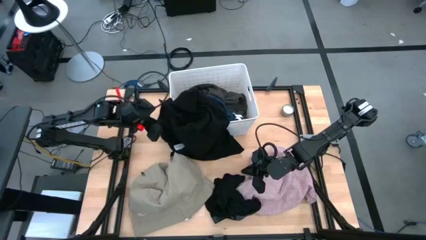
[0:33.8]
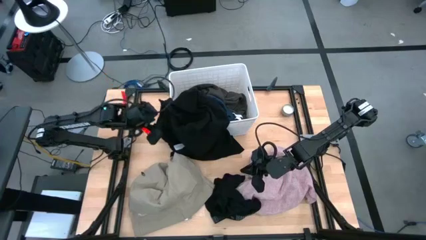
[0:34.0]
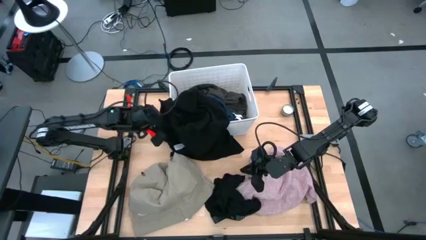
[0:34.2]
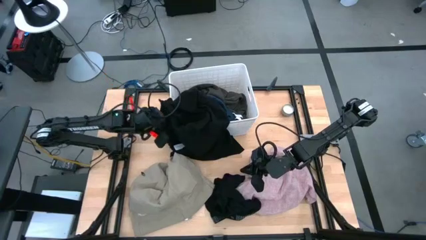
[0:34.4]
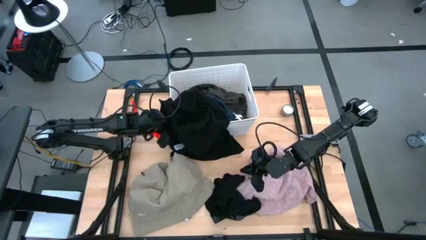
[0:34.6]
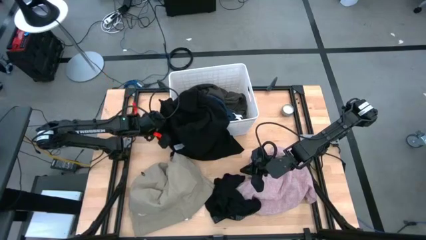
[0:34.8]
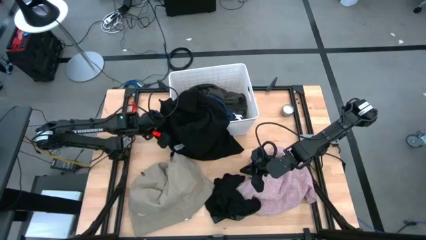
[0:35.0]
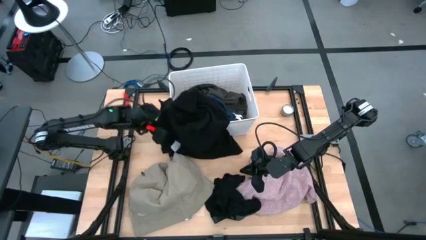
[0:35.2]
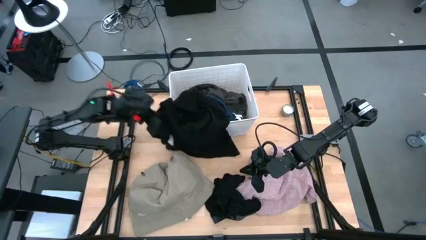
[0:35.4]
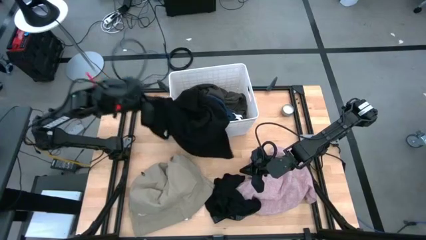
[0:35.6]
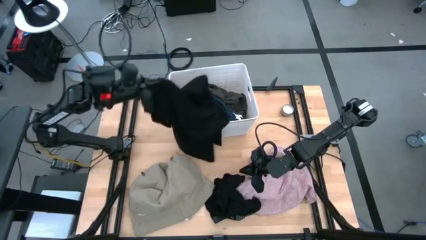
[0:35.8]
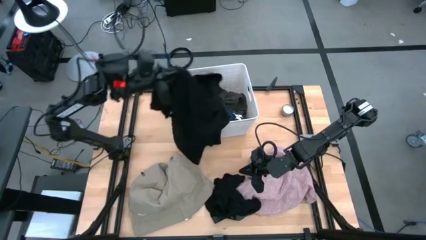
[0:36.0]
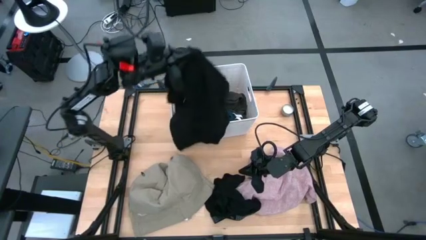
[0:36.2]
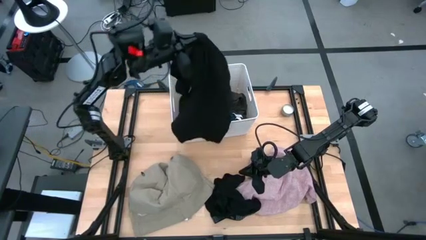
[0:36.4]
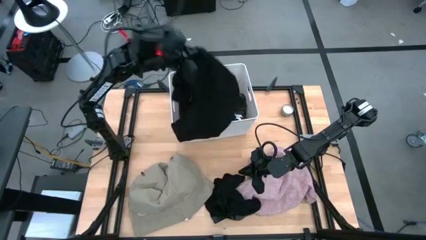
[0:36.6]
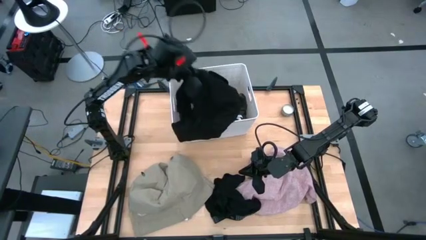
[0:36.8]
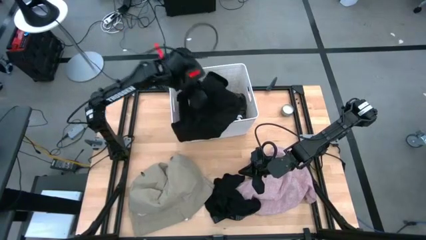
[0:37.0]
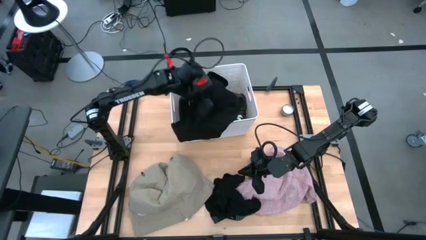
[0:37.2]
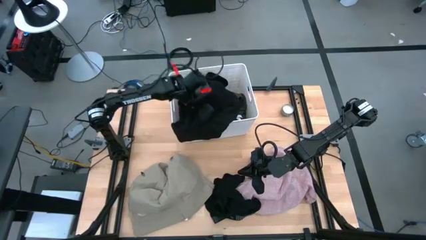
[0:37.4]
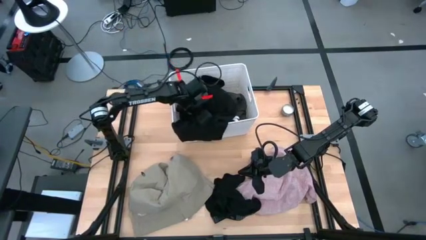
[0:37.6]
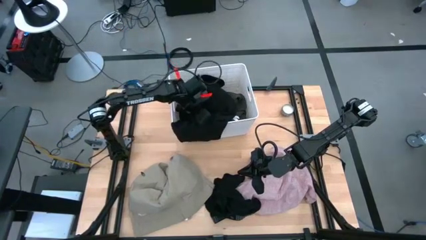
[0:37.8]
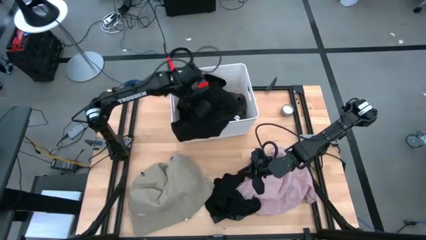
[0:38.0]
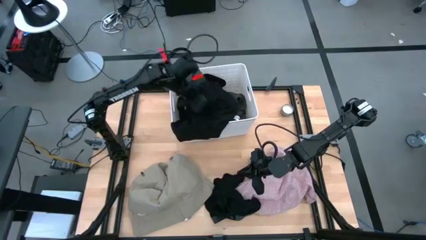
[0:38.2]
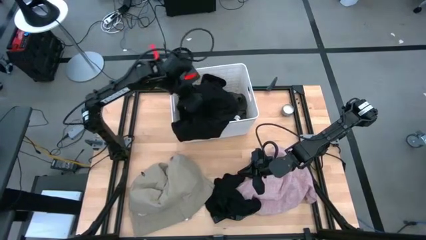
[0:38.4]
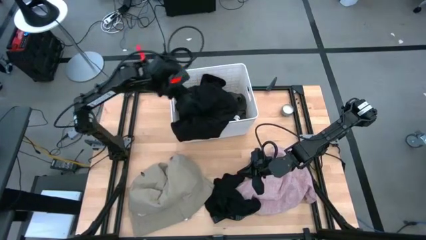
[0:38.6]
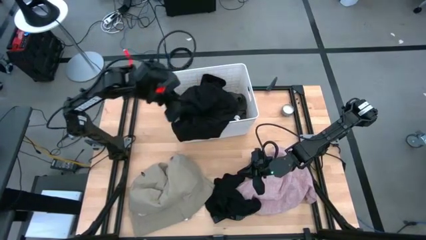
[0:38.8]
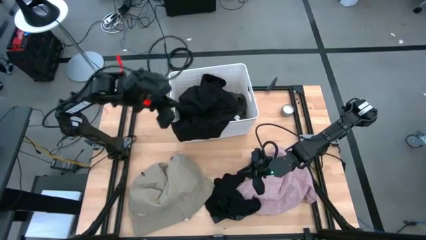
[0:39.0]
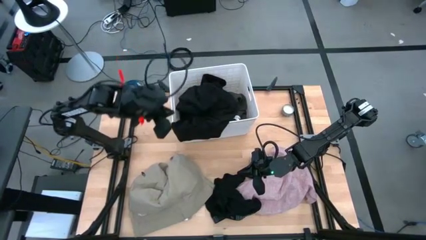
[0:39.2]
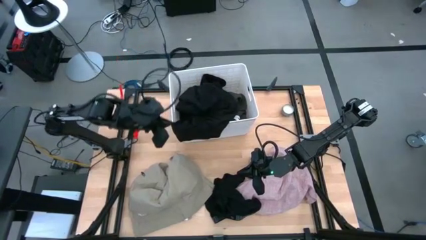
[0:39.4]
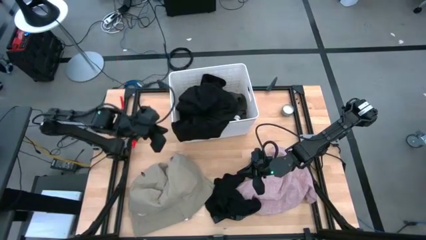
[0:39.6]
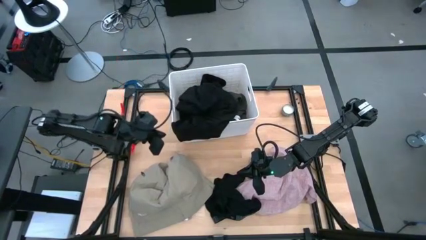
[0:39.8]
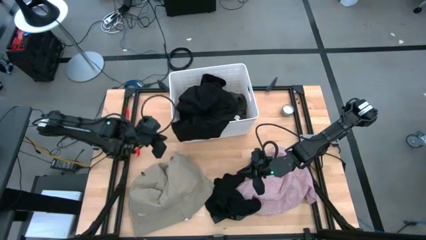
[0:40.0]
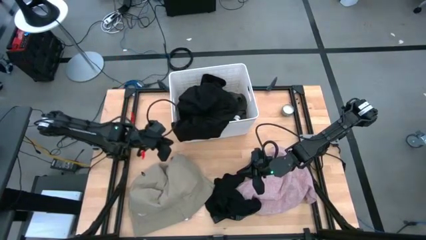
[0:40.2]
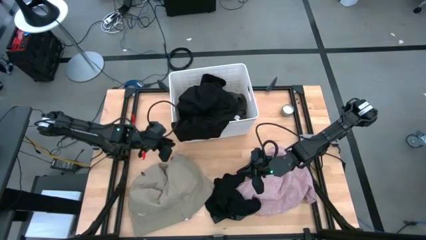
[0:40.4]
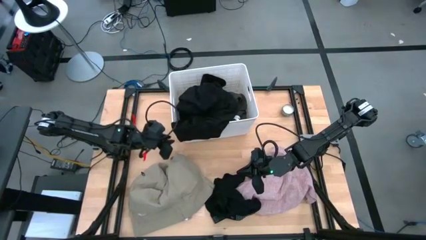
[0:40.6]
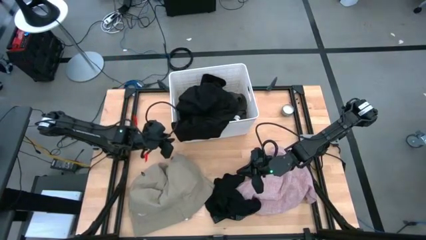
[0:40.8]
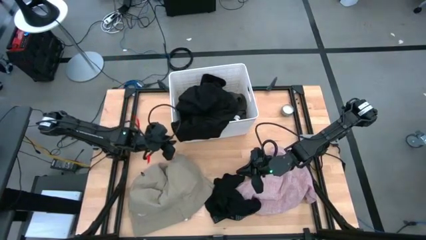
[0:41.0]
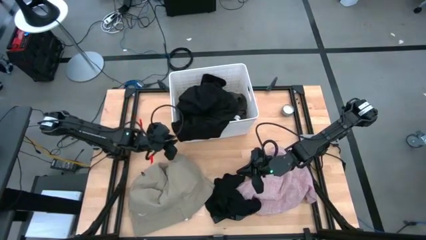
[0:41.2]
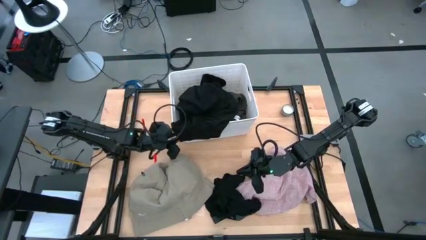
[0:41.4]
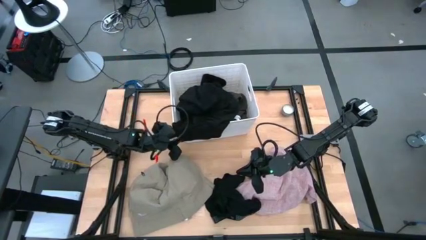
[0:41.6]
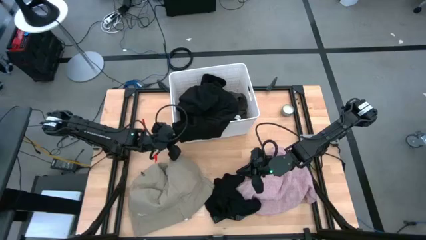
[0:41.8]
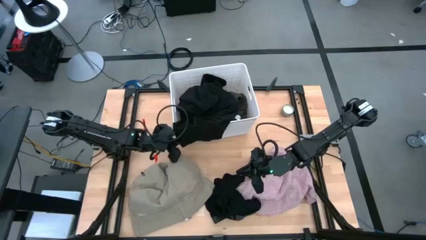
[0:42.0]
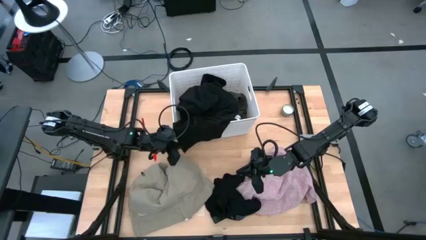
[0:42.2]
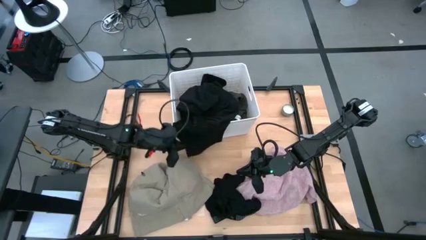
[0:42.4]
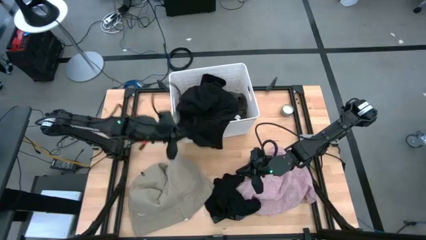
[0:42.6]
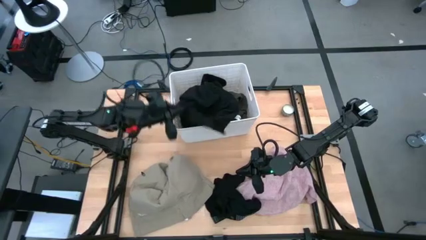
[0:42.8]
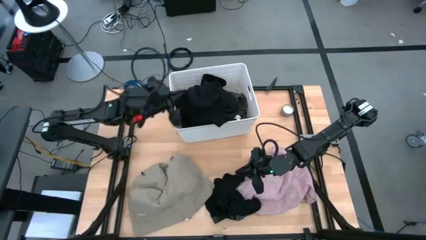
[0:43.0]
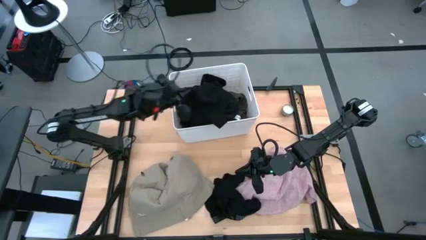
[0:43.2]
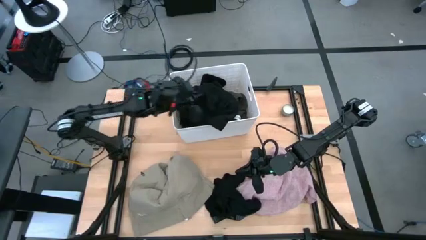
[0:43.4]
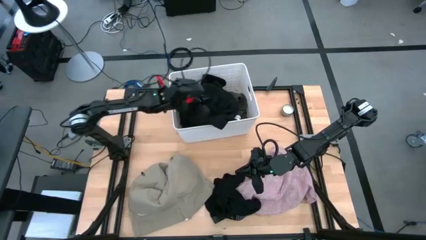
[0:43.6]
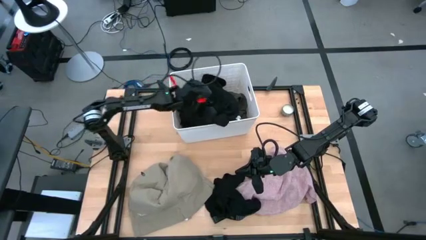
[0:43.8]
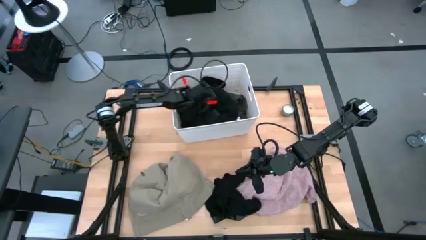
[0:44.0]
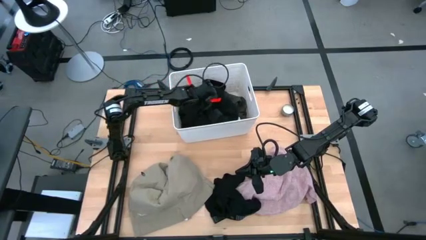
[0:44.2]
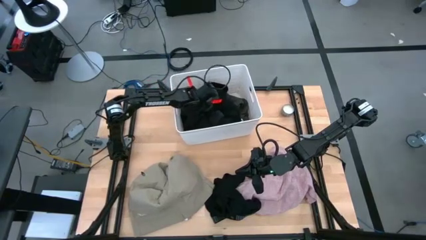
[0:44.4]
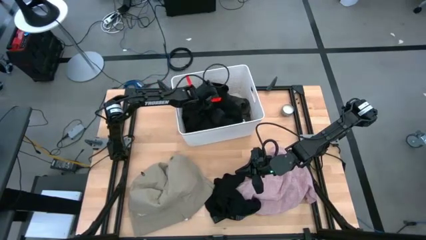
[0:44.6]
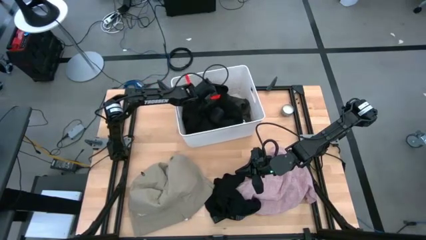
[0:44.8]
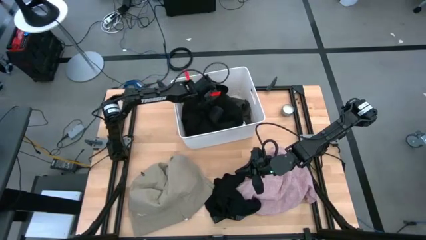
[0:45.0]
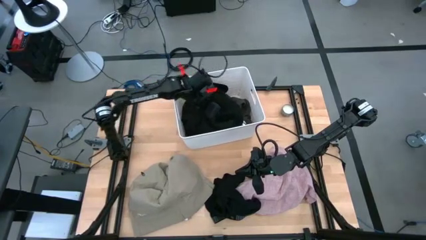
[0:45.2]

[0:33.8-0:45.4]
Task: Sort clothes
Put the black shirt into the white laundry bin

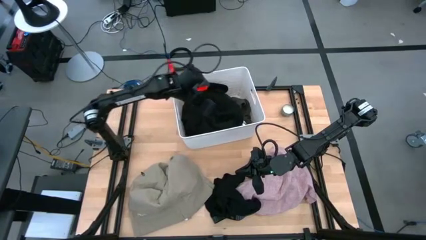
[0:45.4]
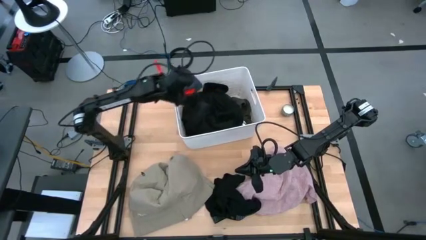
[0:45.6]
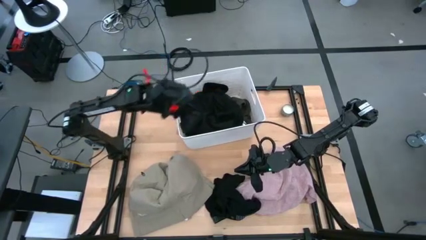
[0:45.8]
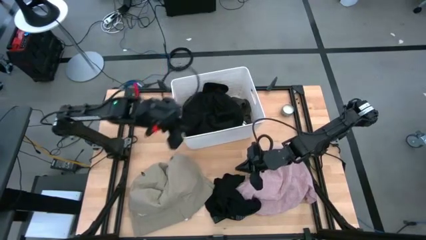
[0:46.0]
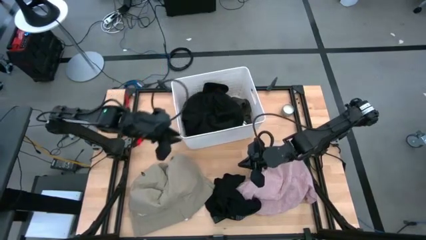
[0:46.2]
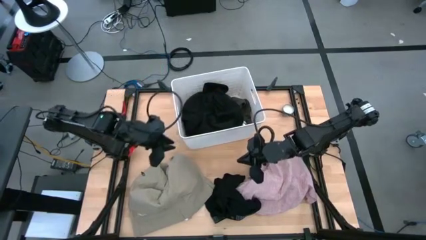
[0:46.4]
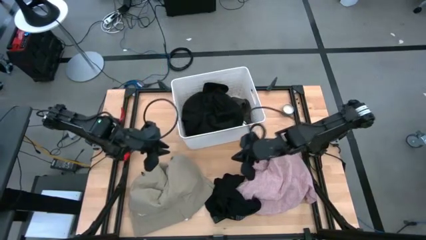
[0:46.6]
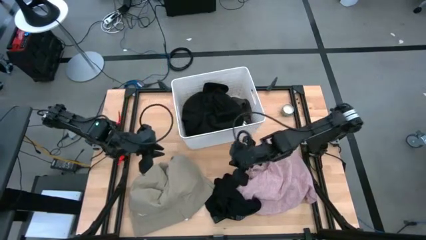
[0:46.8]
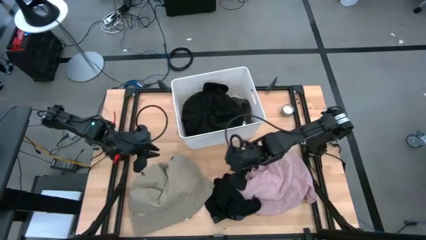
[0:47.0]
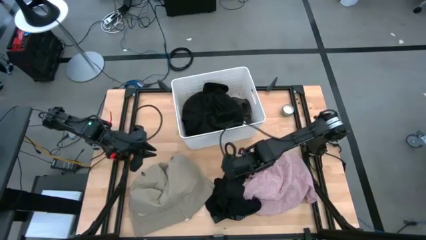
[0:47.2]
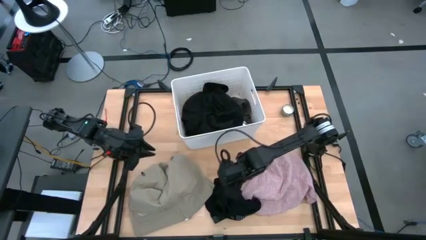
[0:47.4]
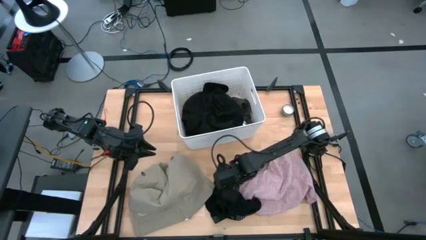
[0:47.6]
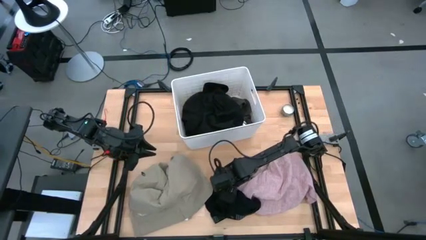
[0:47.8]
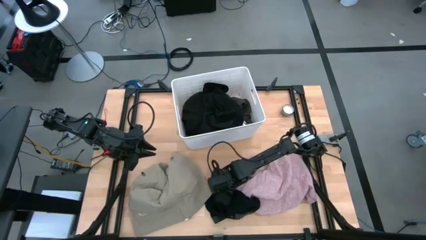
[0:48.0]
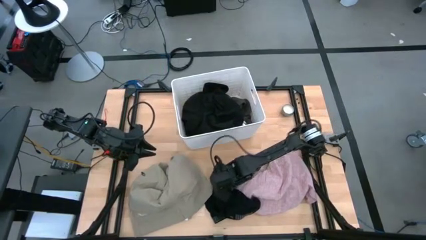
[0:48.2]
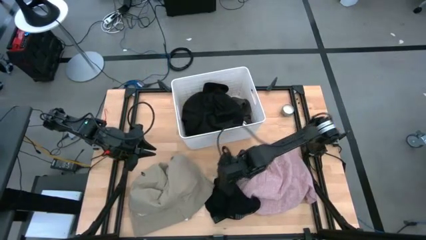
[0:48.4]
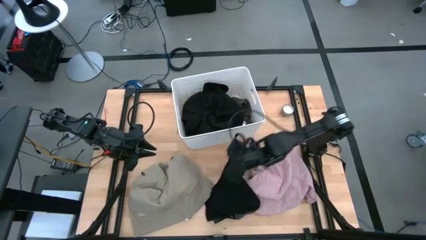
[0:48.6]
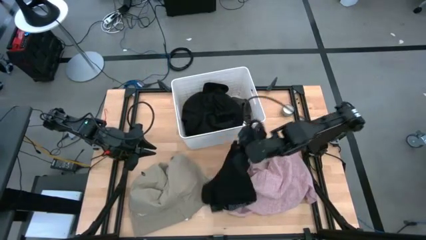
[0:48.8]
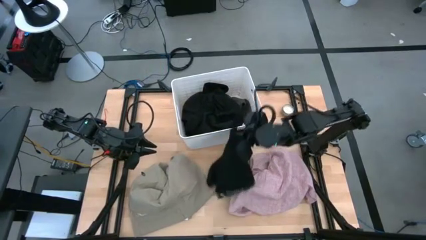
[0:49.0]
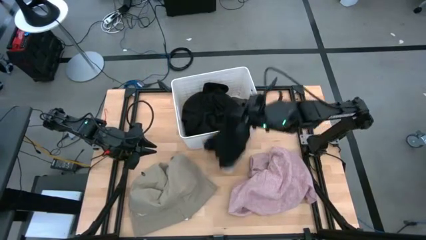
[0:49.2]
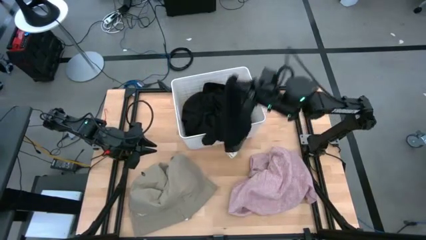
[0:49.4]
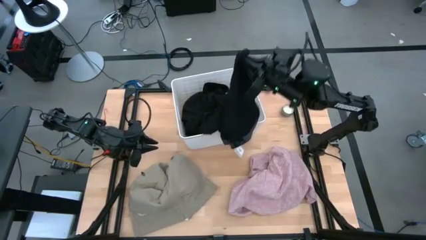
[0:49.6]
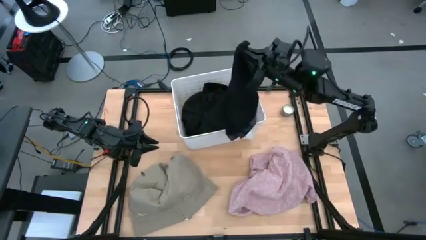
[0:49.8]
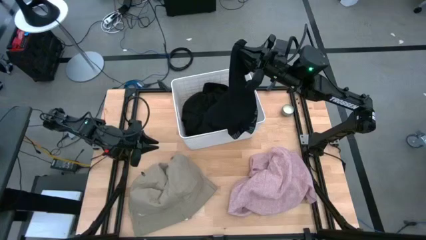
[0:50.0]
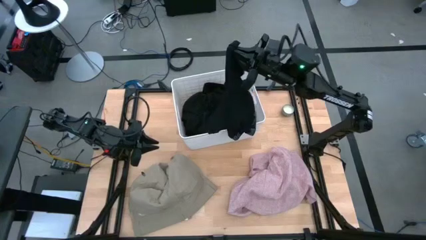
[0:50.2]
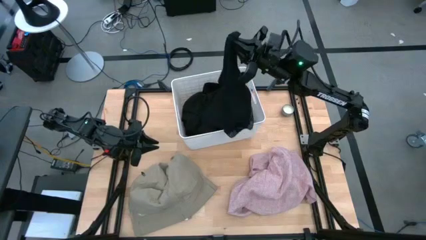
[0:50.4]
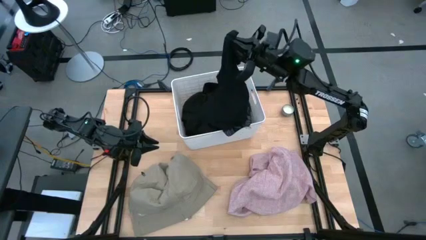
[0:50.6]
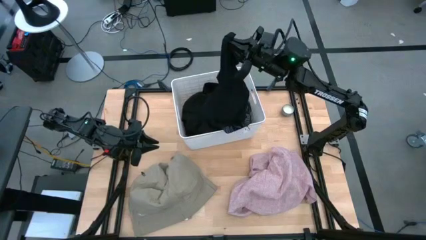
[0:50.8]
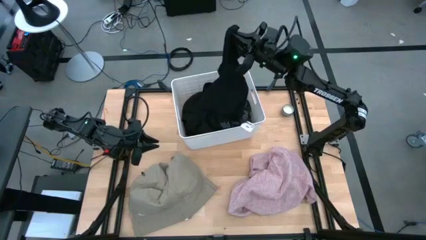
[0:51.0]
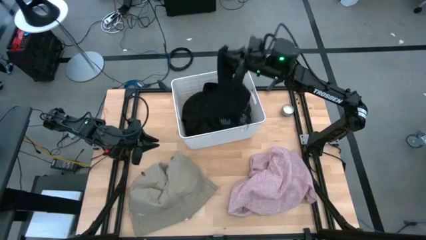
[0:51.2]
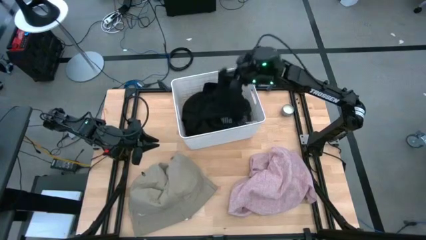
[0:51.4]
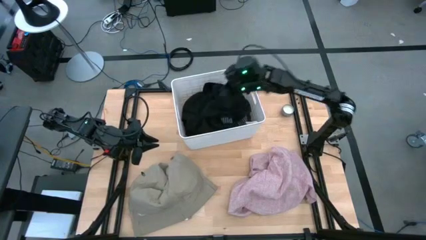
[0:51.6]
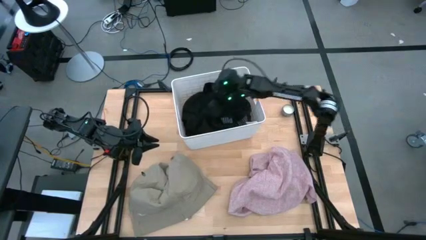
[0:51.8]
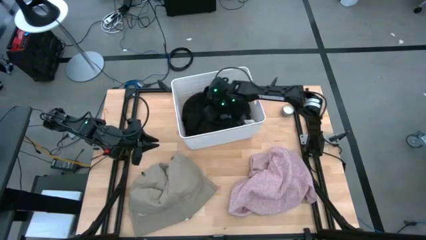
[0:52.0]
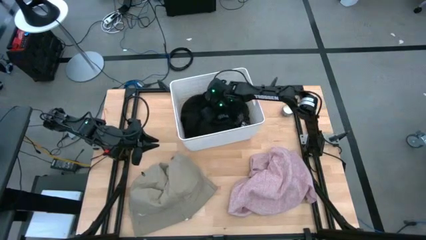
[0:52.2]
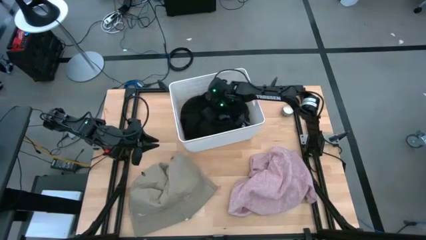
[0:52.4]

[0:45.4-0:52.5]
Put the black boxer into the white laundry bin
